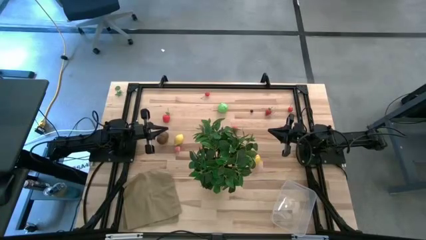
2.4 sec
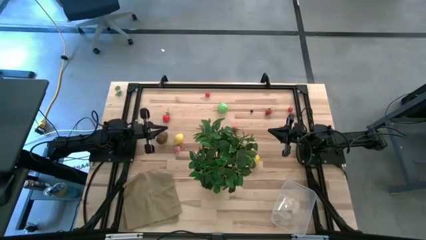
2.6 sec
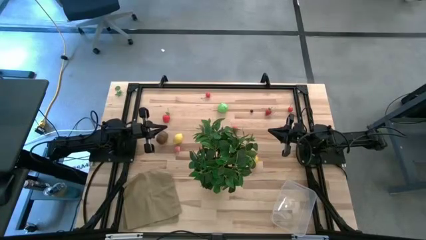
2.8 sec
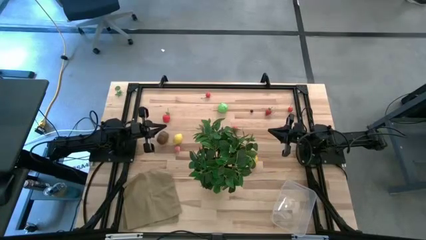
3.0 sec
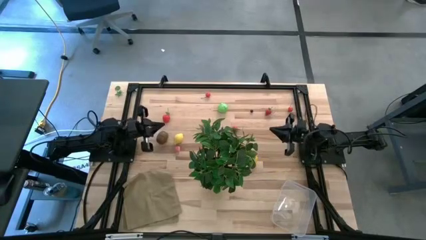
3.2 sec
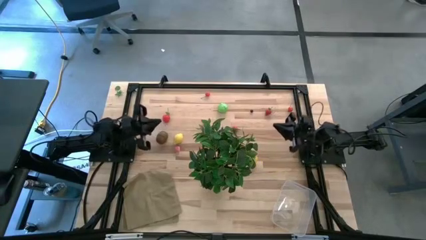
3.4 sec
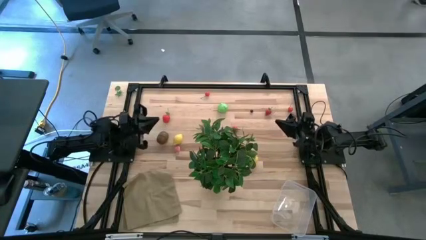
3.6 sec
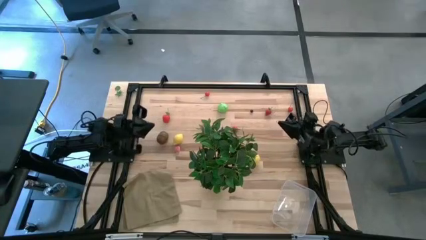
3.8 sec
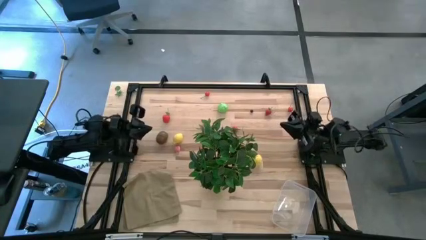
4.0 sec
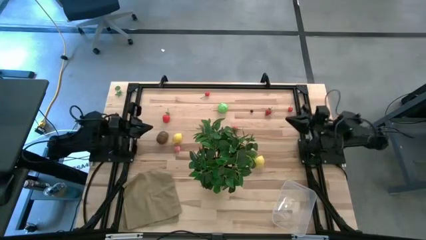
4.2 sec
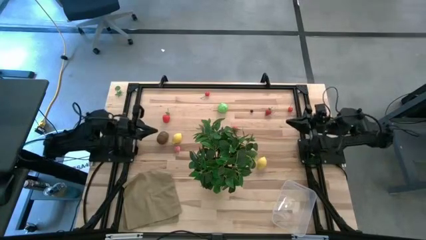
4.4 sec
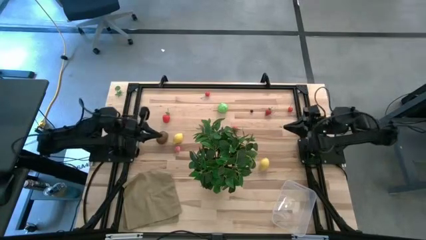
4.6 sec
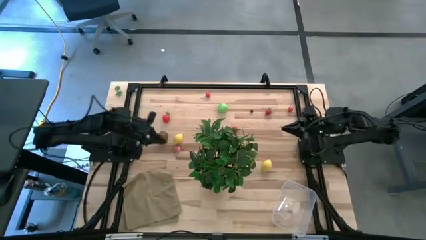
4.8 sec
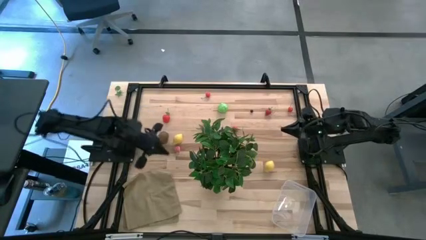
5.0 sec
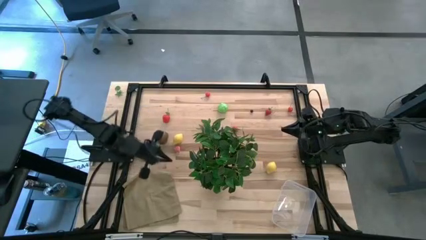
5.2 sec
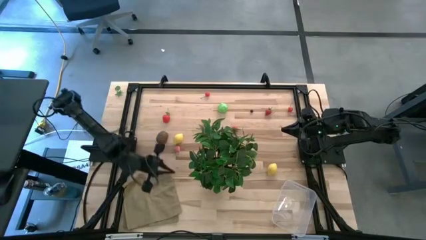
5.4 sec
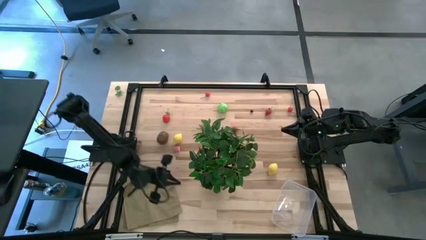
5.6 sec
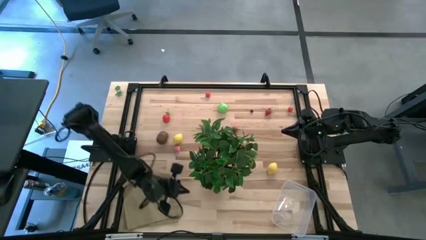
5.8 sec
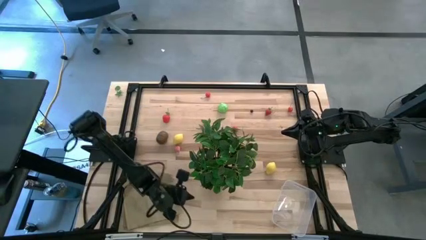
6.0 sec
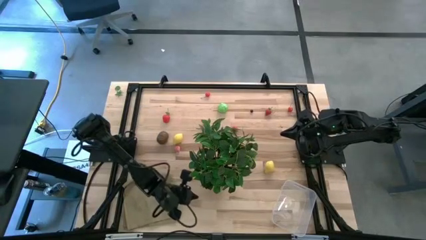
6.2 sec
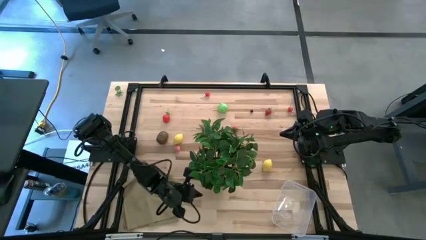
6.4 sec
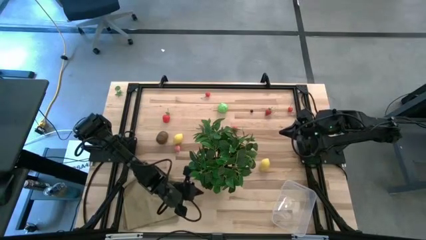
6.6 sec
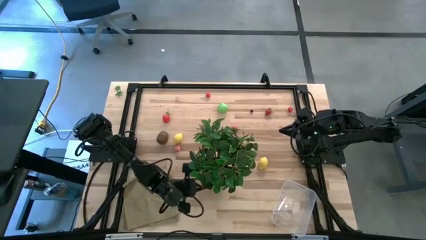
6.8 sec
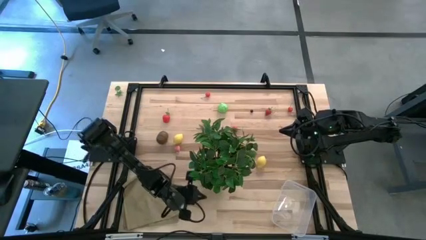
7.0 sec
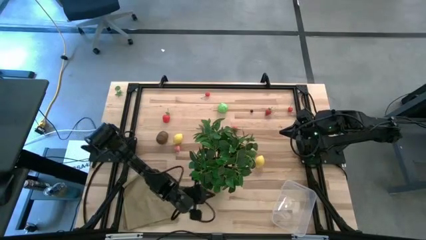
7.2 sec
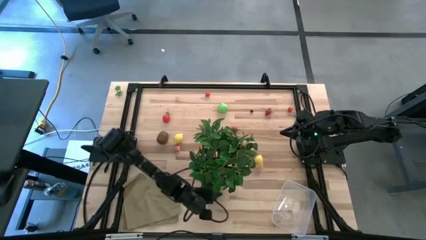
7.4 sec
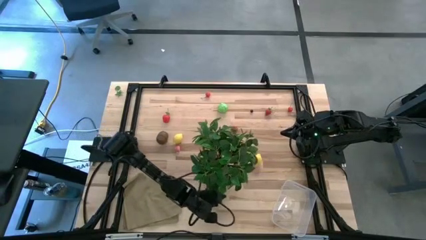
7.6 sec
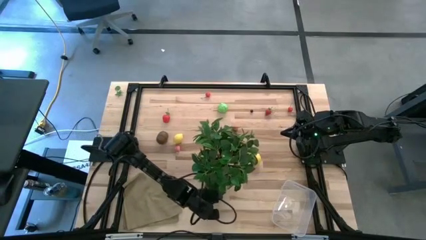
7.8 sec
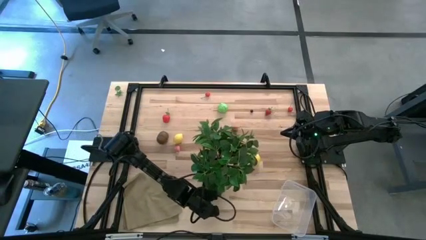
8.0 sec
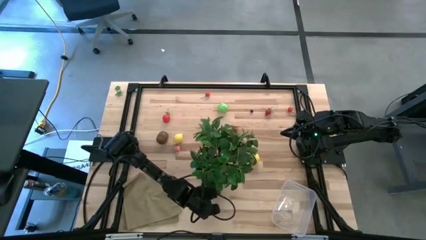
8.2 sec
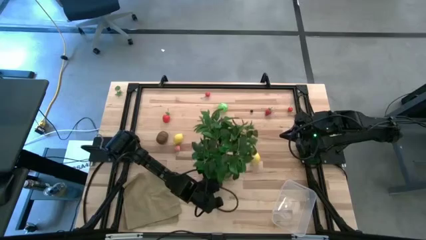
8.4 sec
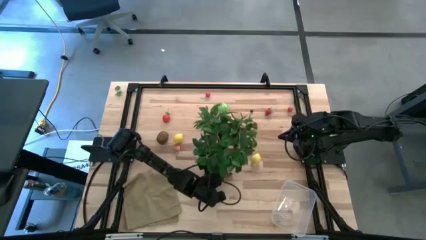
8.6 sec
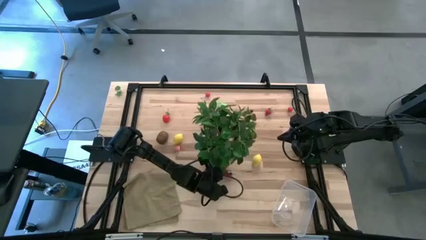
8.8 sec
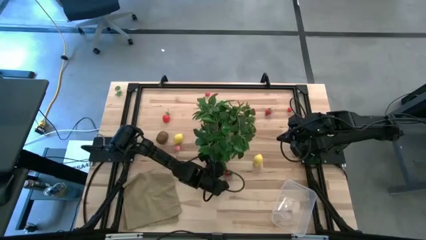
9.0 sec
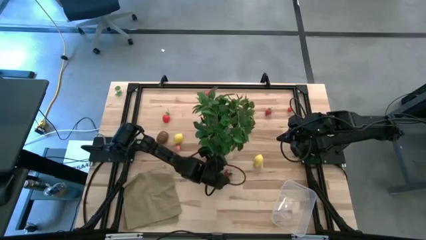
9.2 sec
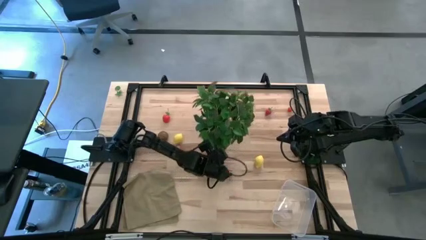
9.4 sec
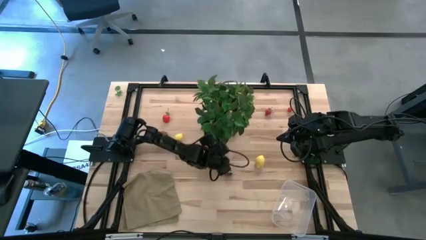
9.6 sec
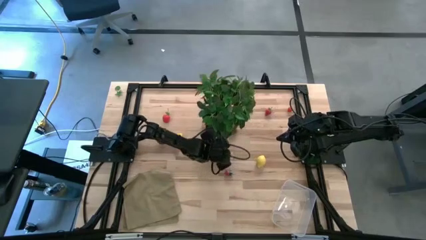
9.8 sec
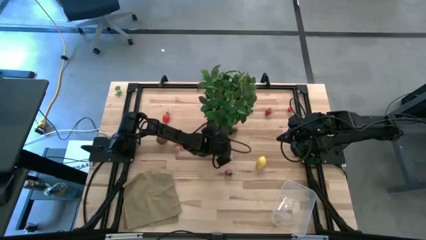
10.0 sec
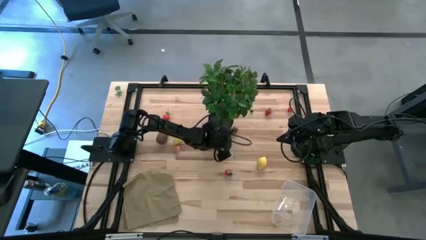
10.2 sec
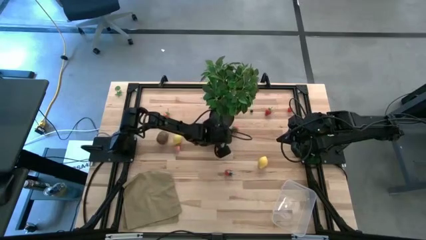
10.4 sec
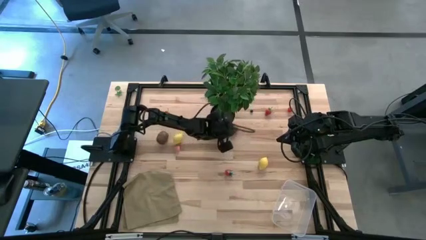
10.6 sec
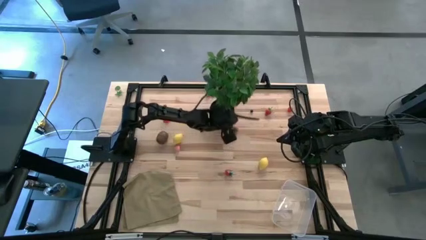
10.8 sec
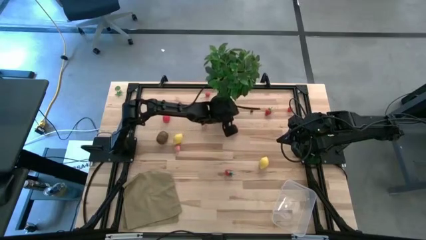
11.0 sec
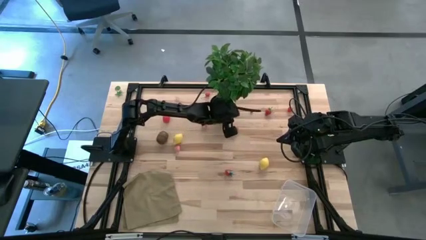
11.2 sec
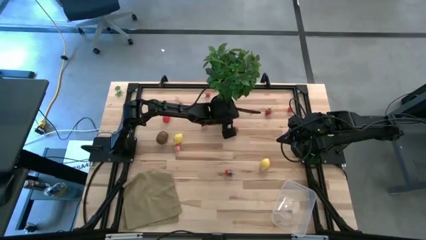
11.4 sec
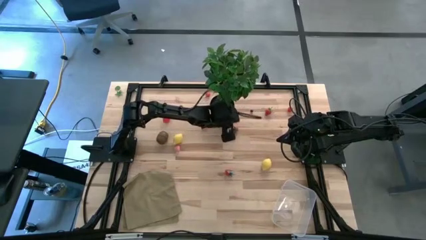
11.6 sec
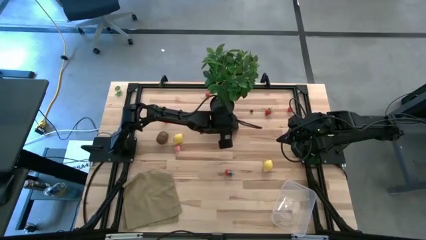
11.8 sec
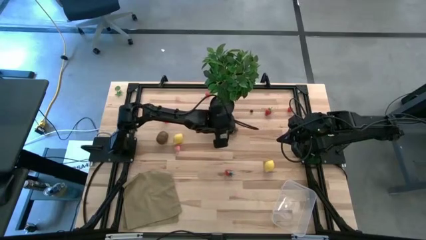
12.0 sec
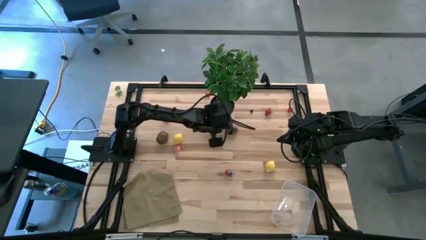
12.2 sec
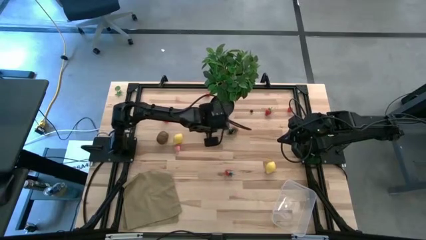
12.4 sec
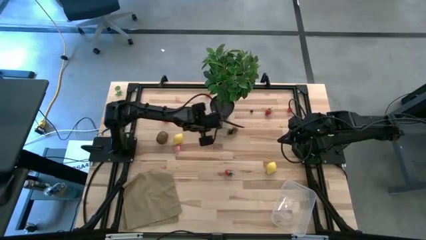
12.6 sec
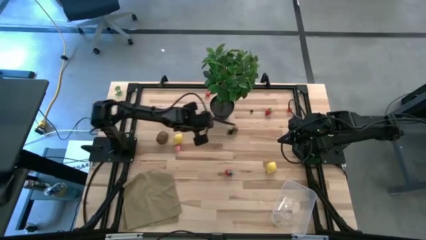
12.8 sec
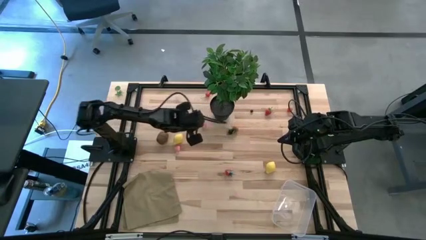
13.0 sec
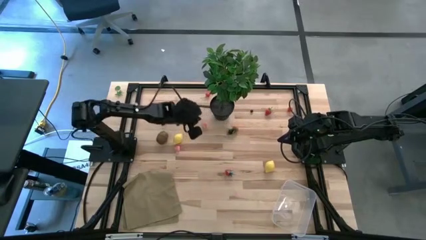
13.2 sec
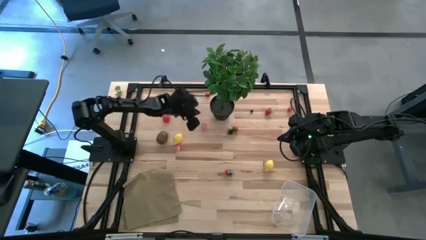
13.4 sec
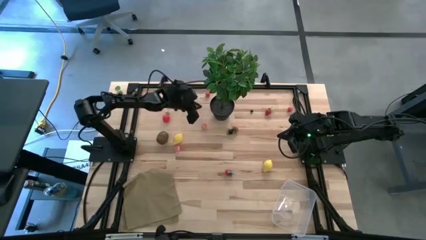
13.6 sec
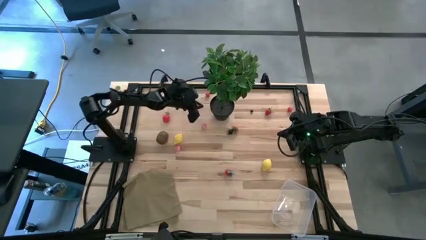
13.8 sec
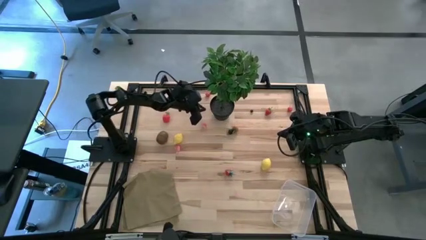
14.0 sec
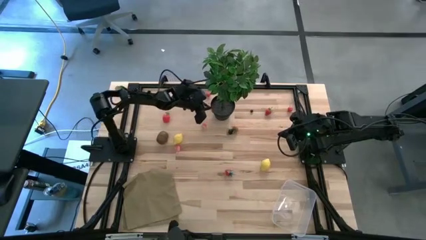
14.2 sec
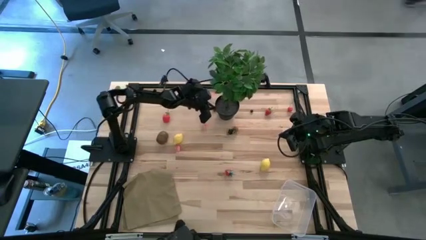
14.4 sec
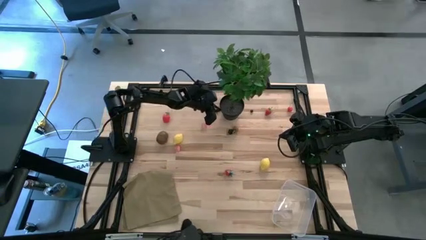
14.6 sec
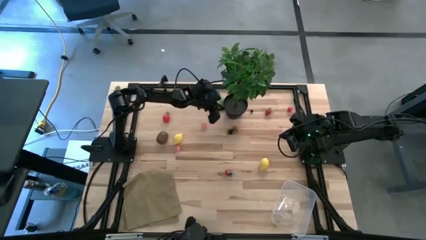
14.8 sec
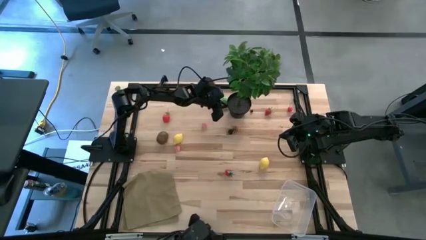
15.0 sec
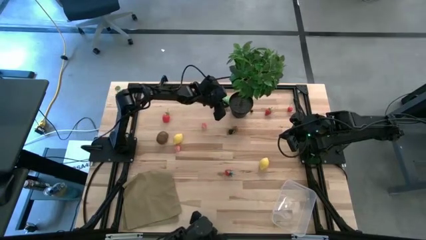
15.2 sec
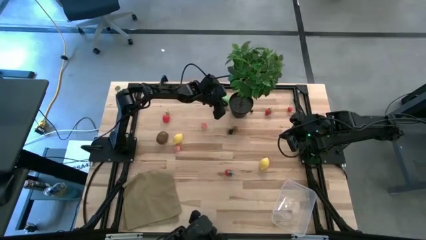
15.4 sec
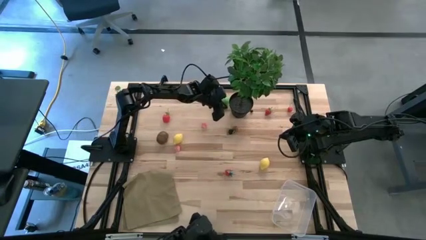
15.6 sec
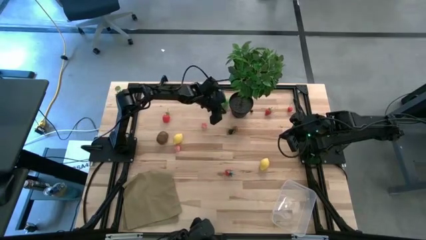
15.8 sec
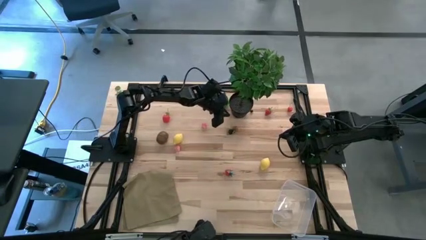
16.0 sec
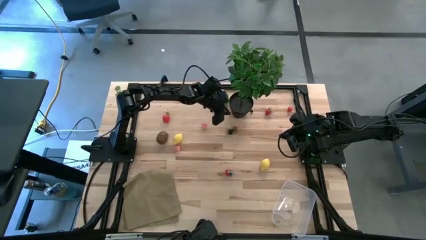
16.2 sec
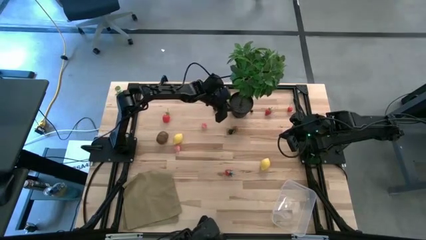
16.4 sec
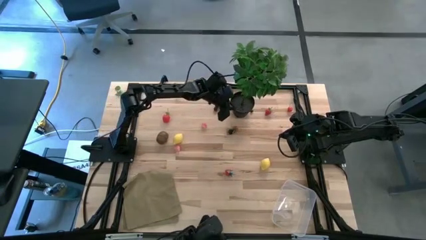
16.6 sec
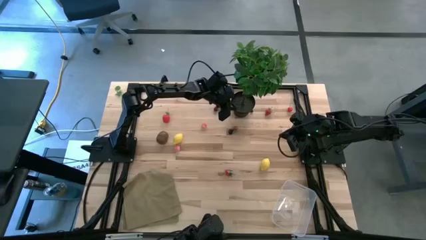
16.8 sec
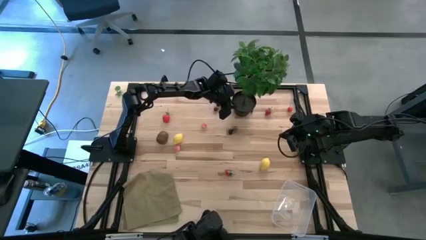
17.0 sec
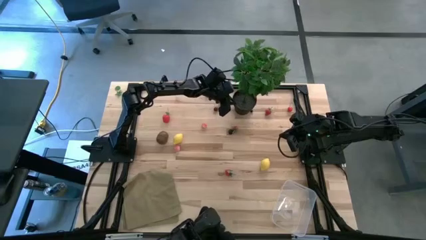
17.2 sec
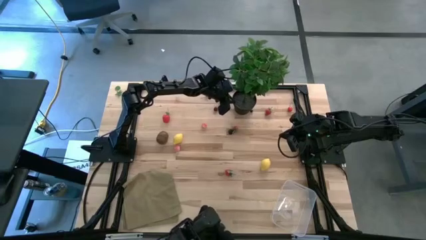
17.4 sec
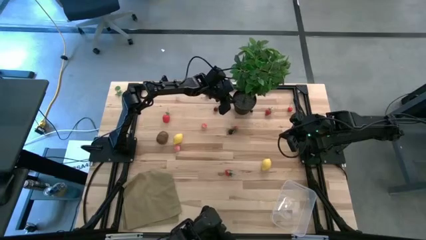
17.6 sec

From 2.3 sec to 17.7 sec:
Task: Pick and placing Produce into tupperware
Move the plant from the center of the table to the top right of the table
